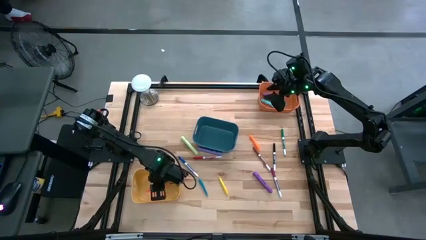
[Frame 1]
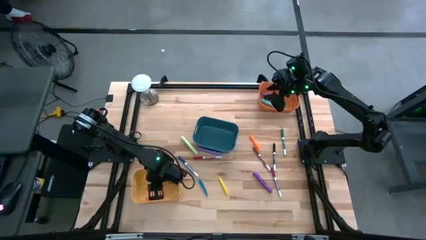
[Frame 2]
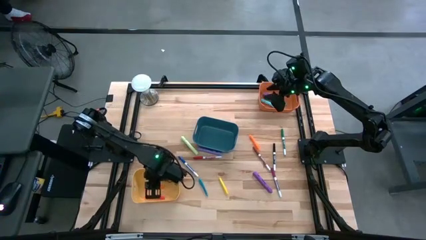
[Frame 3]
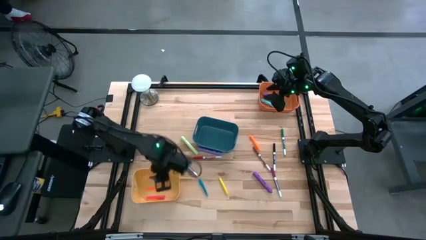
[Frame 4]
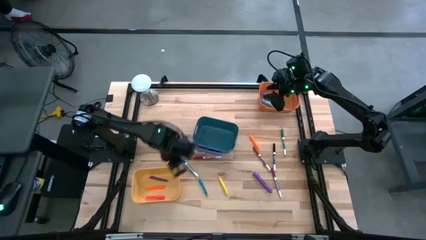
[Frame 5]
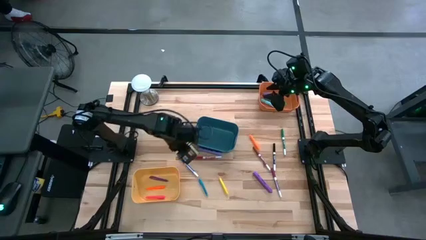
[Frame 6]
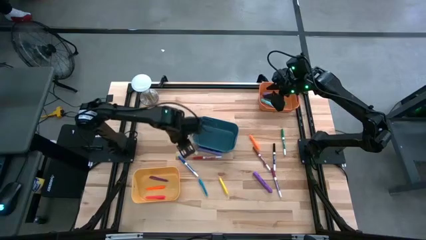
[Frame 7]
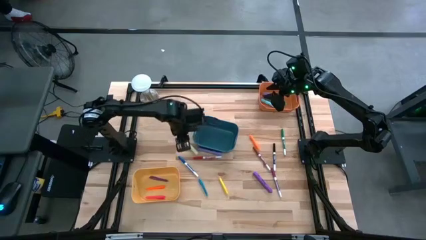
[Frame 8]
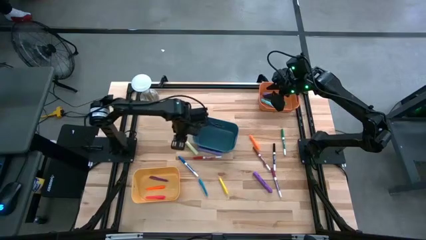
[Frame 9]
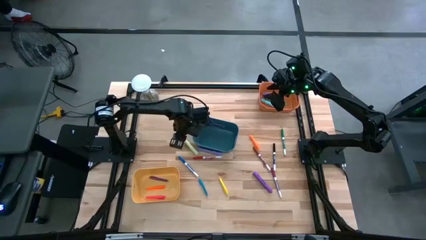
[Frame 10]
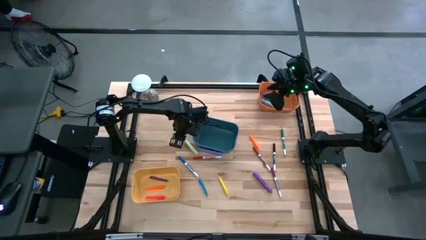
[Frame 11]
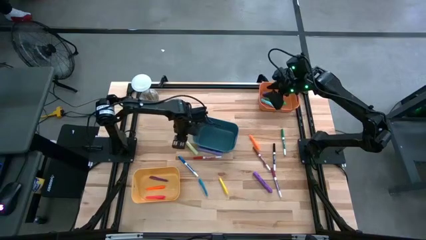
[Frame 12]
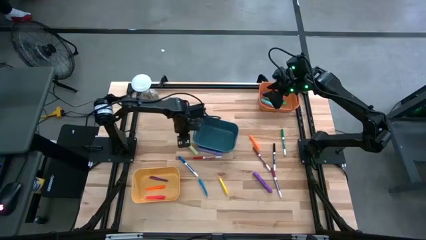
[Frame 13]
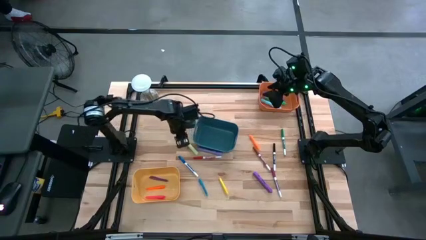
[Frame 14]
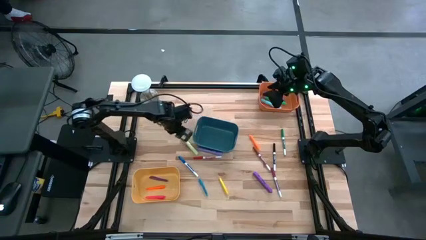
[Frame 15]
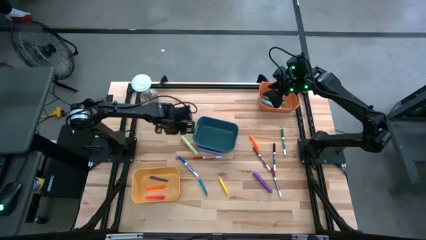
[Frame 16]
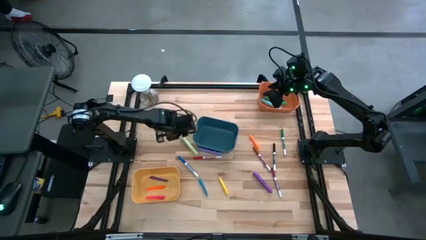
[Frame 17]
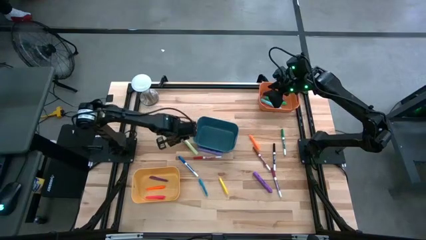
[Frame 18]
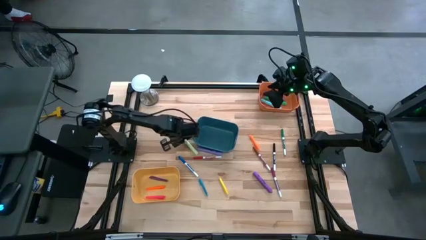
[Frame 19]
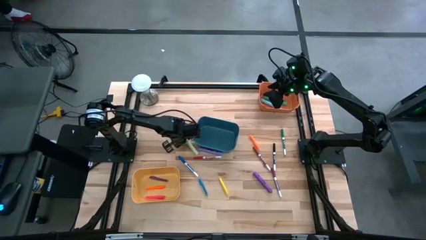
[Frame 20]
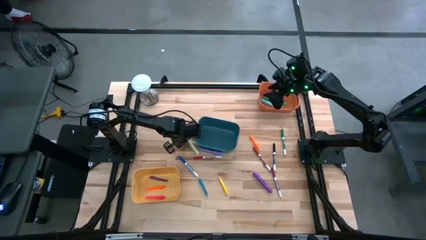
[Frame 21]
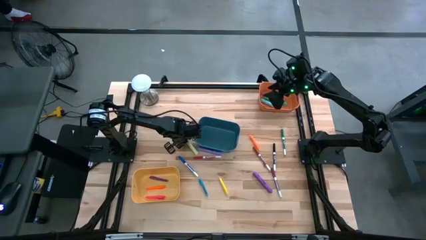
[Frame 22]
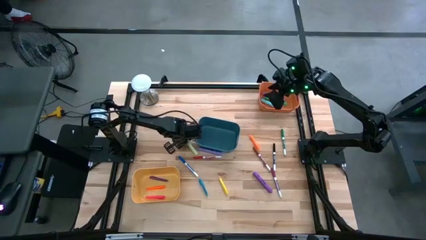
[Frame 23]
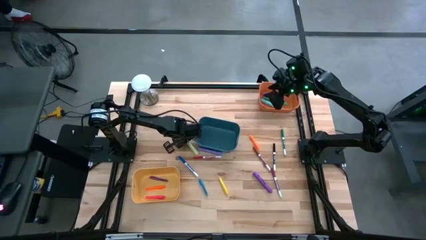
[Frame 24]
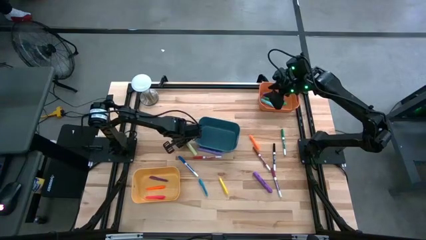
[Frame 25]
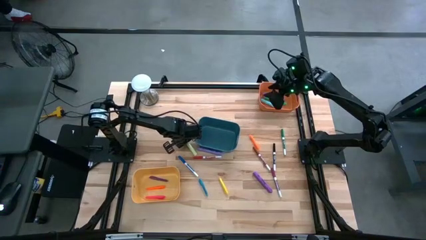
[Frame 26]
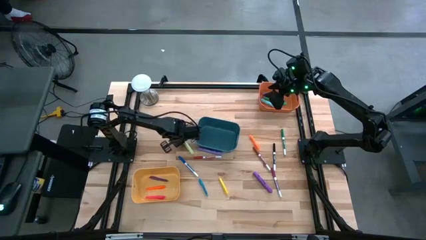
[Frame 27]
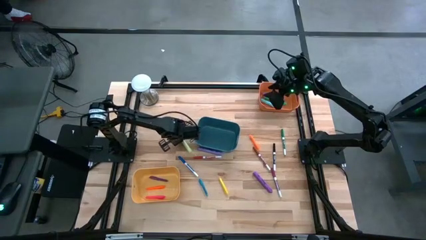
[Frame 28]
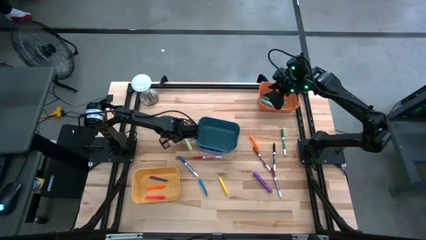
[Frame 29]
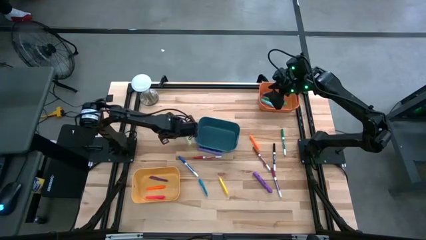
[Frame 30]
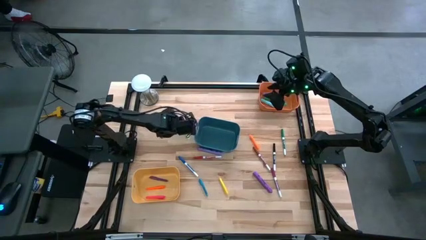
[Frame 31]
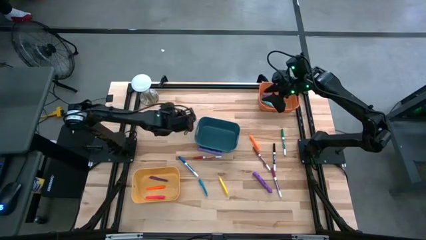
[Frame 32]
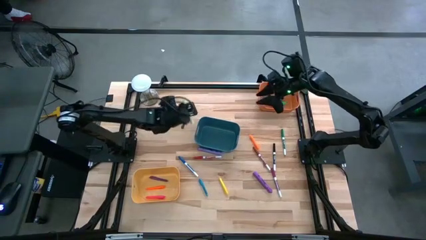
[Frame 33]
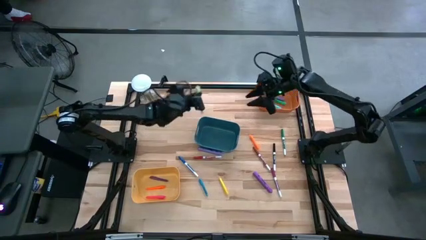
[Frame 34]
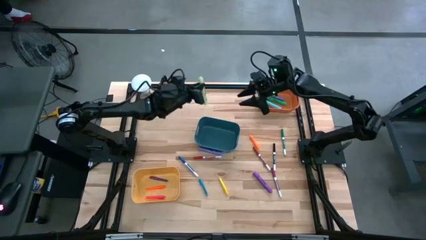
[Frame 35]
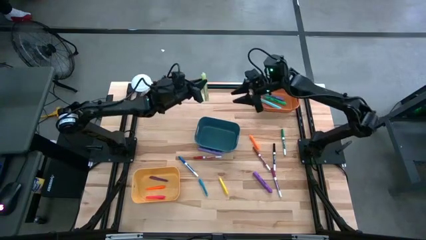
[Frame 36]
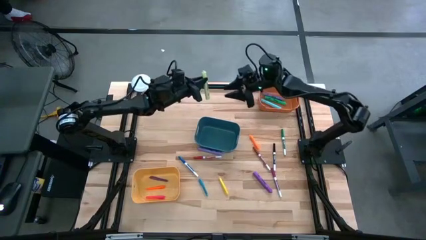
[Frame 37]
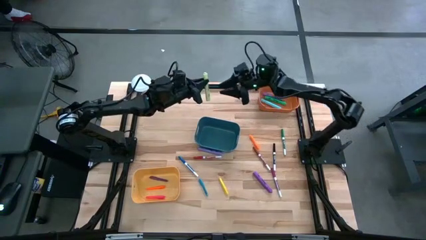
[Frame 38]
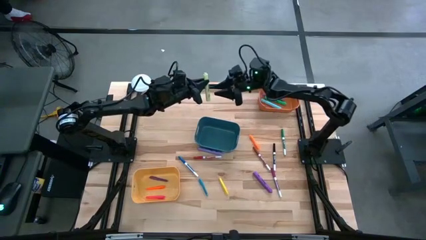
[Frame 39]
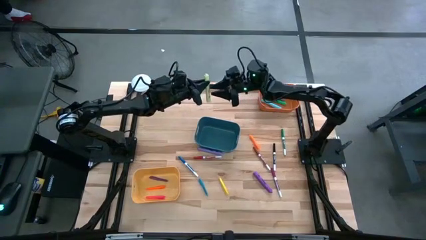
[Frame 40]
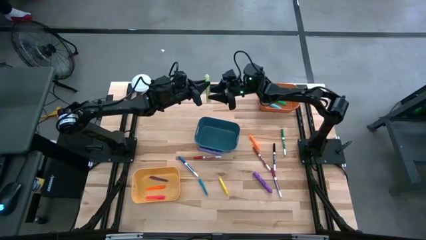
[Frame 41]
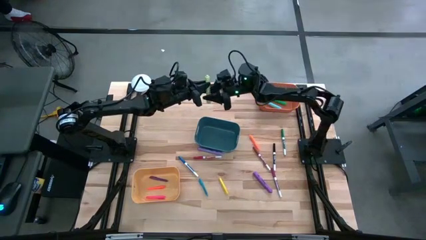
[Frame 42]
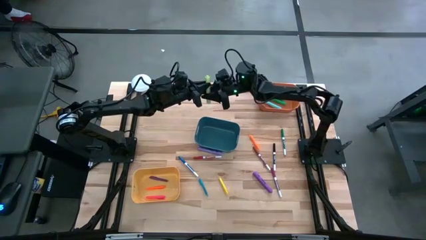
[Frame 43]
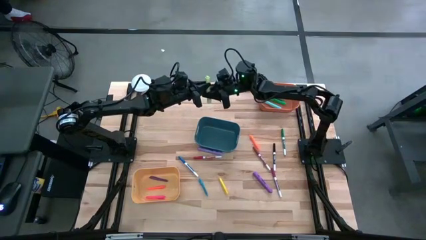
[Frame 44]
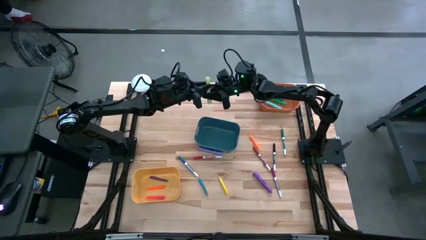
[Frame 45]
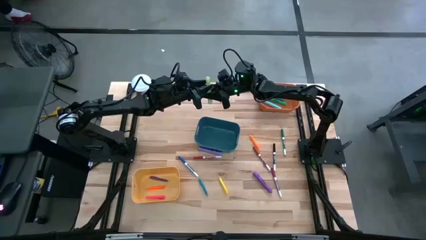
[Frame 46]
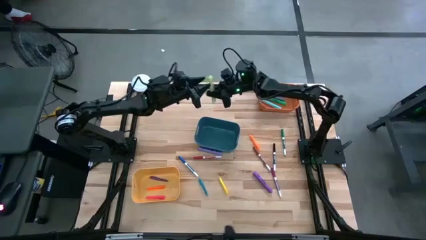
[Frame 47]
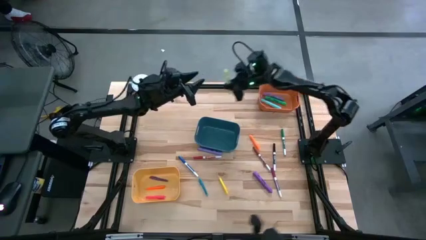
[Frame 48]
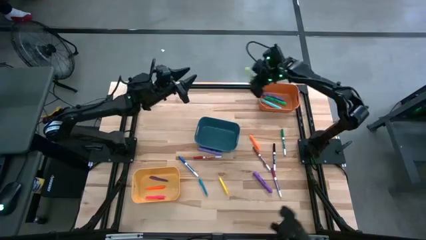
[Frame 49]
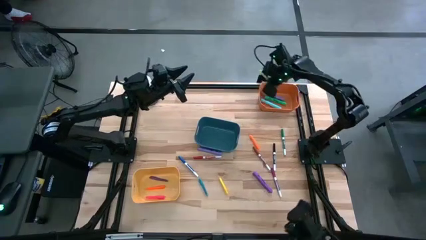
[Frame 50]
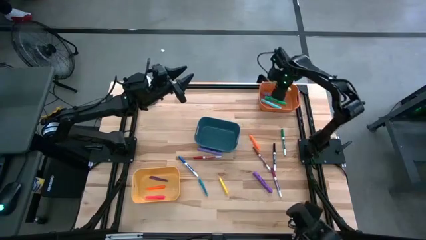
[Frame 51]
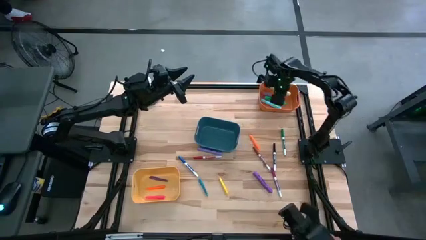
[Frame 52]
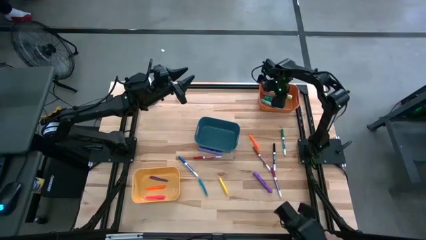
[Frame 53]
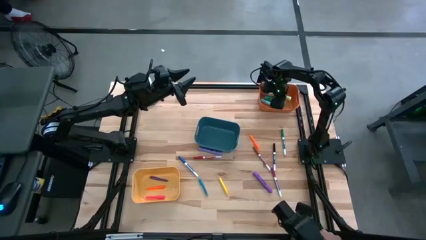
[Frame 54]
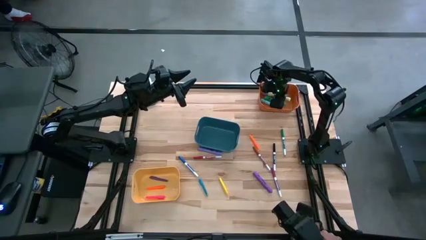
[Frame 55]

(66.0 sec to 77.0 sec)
Task: Pick & Place Markers
Put the light yellow highlighter pen into the orange bin

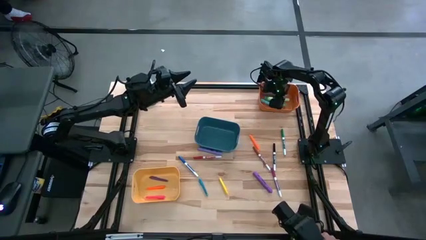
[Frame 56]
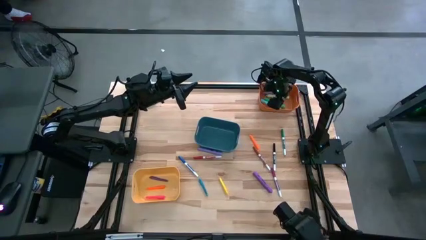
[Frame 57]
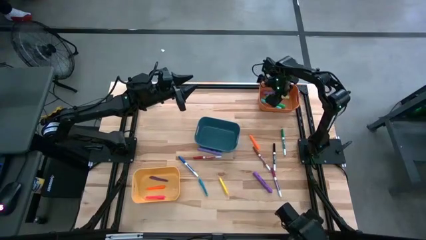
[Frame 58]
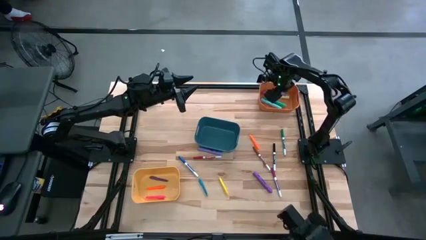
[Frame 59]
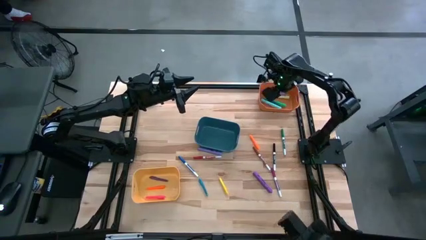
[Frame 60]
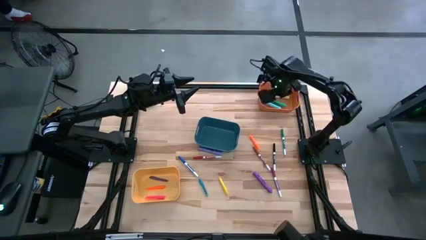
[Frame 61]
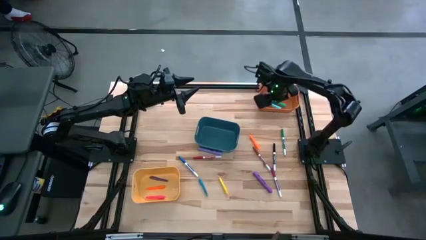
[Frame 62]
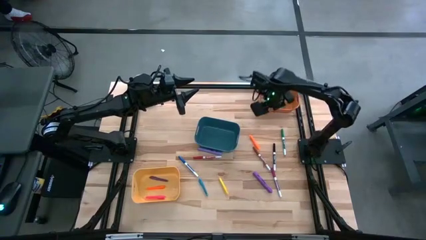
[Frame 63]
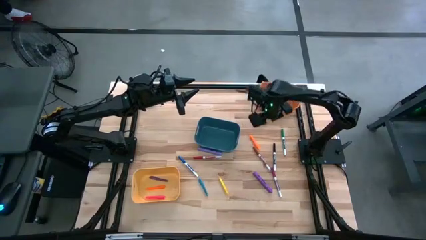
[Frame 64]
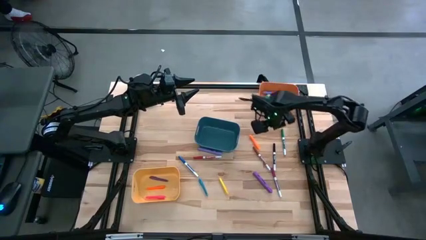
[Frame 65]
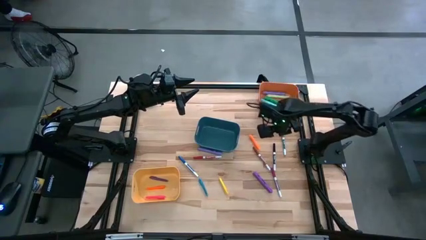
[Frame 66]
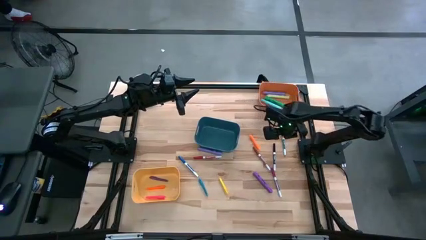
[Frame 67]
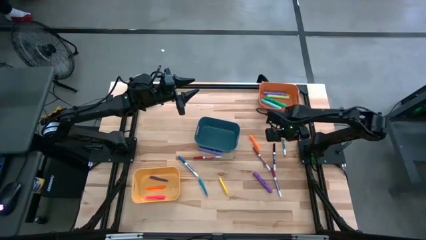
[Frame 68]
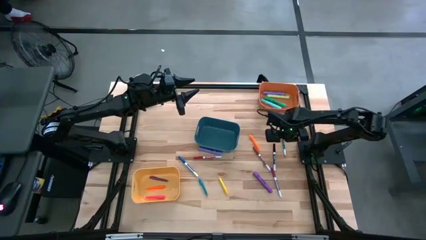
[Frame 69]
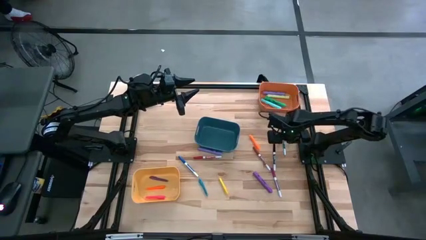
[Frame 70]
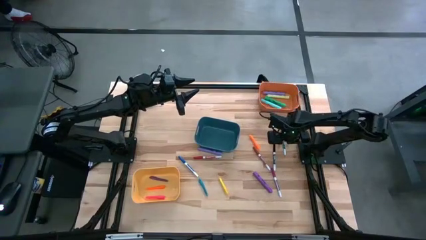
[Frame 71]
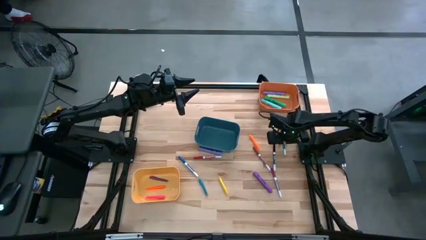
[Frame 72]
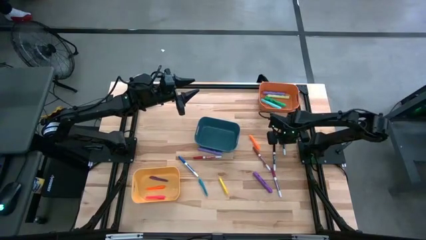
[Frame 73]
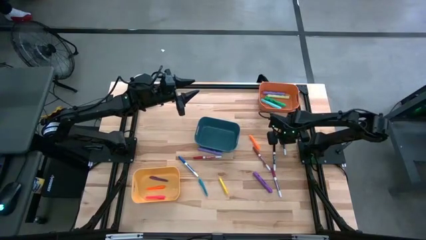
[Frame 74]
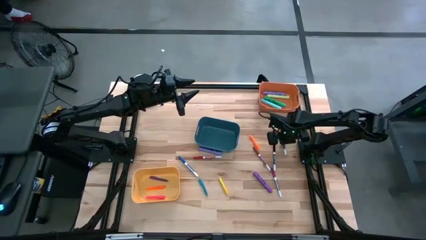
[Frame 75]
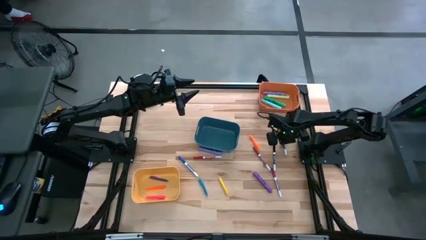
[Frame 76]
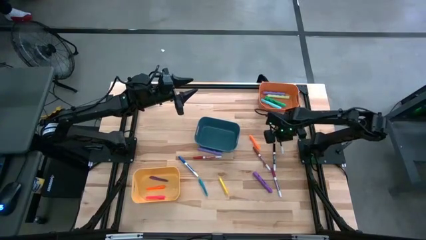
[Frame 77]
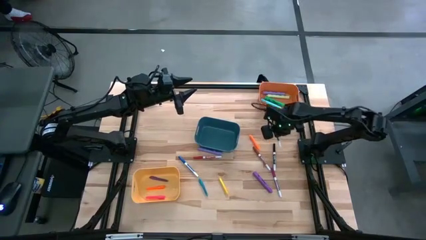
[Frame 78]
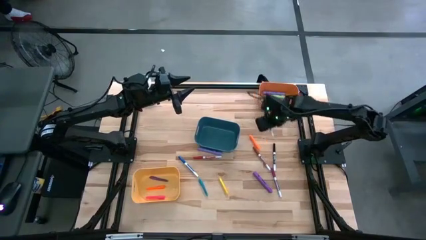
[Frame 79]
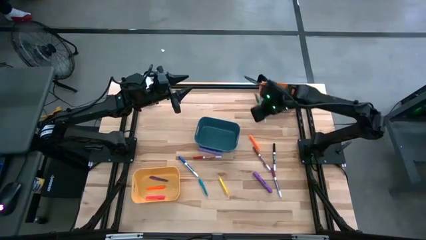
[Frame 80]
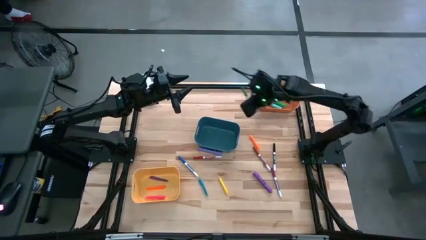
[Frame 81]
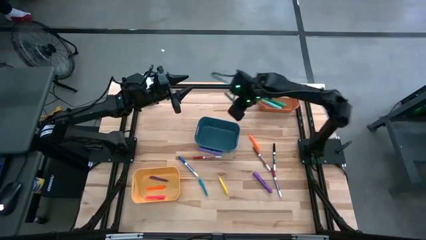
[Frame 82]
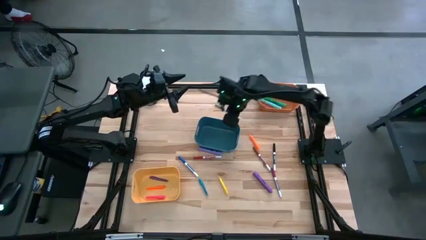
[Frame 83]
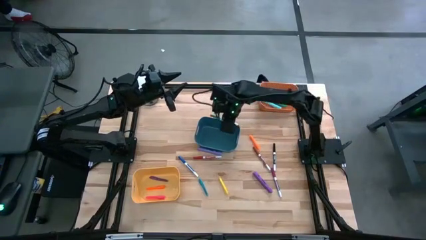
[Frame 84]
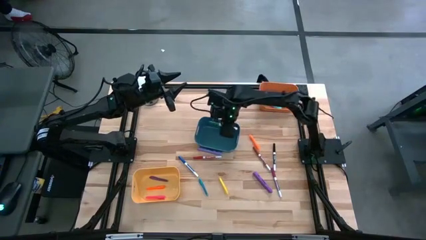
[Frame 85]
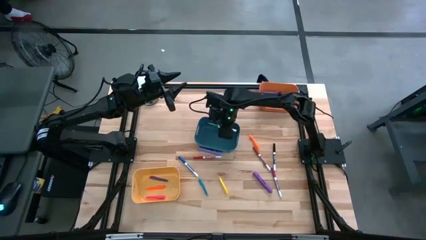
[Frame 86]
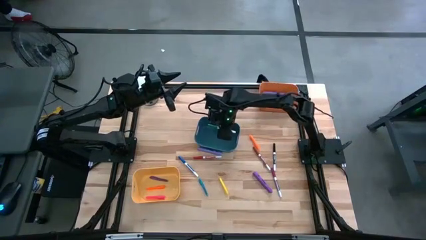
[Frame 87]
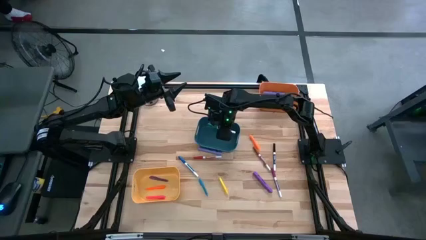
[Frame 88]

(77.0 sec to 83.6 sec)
Put the green marker pen into the blue bin
